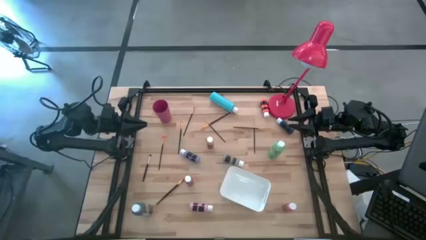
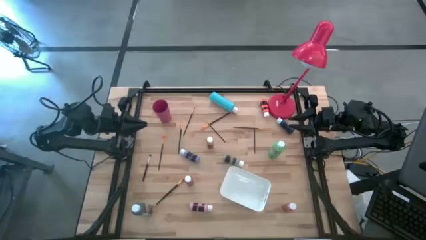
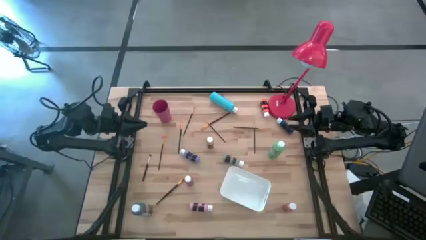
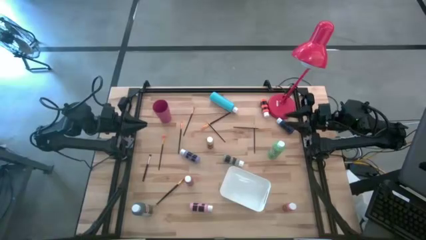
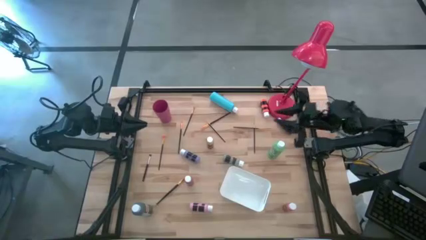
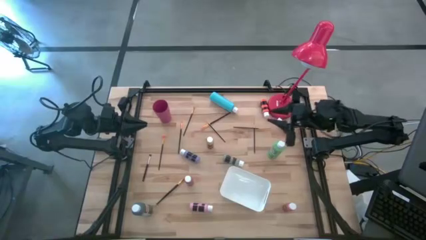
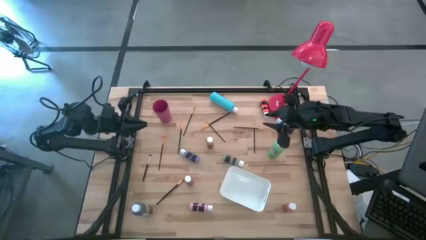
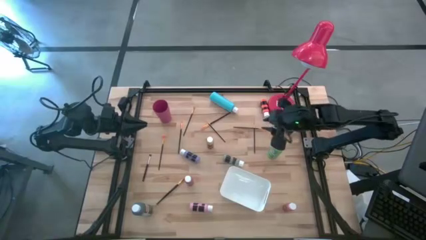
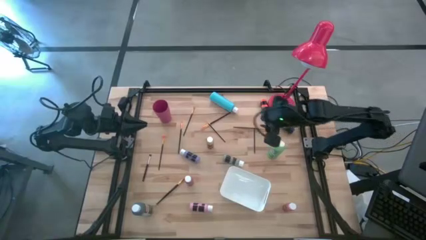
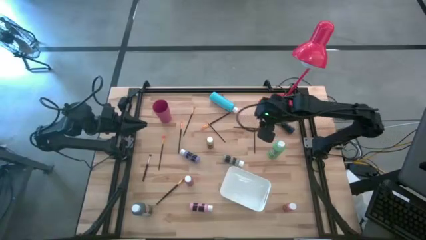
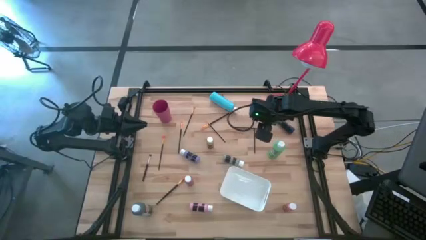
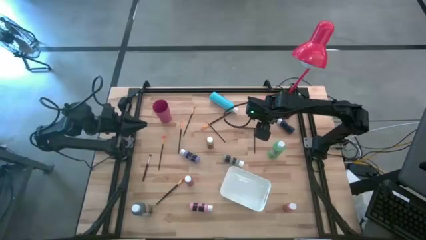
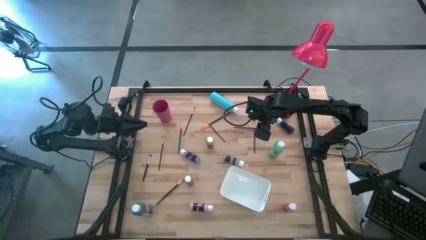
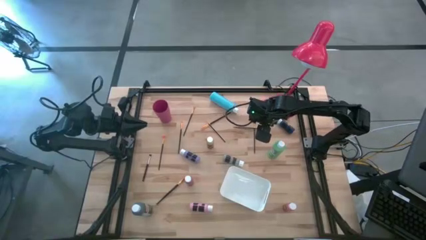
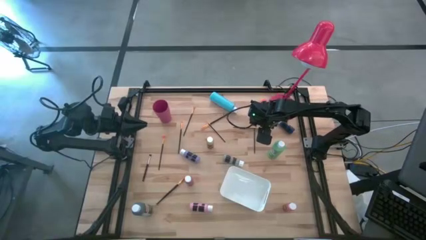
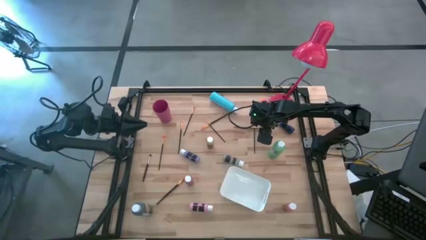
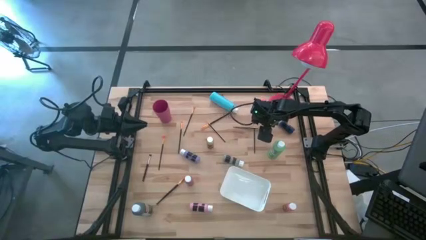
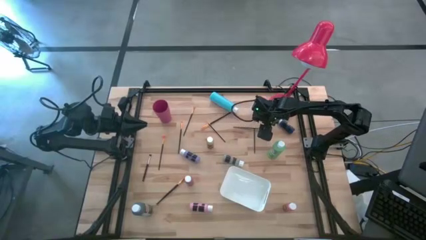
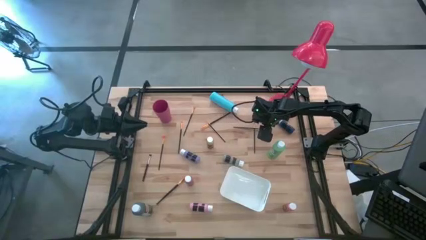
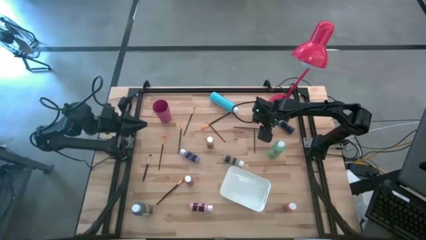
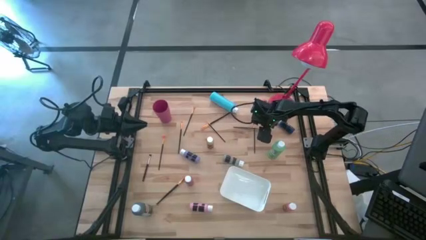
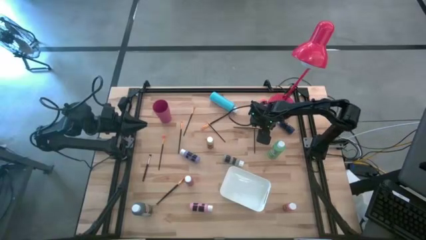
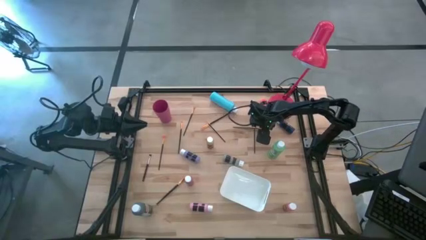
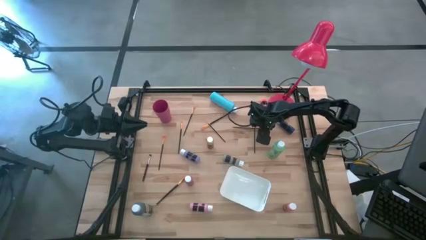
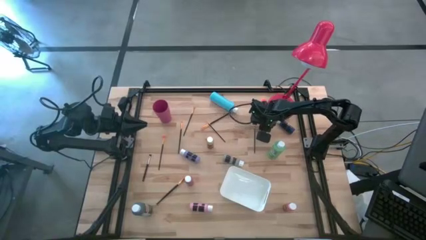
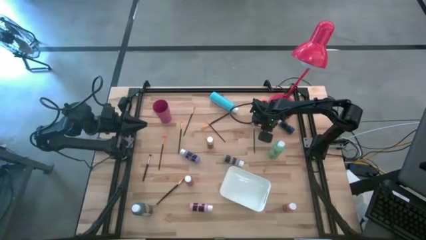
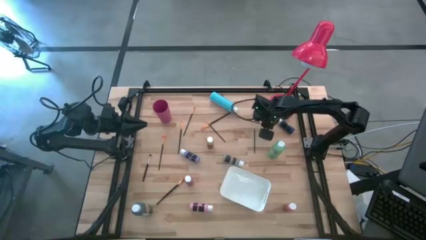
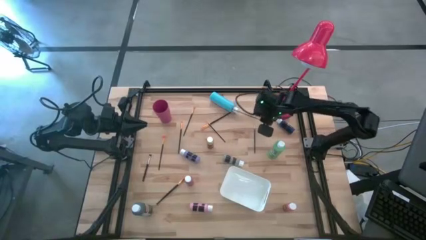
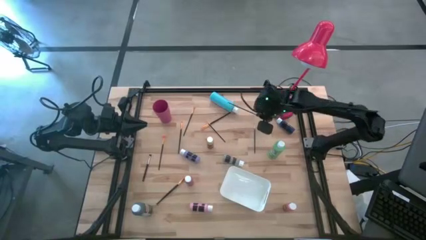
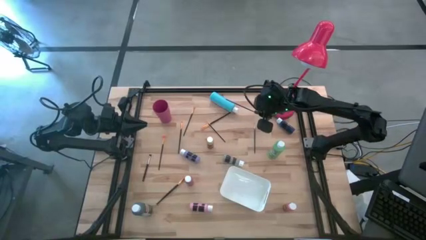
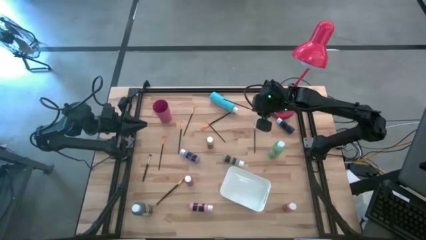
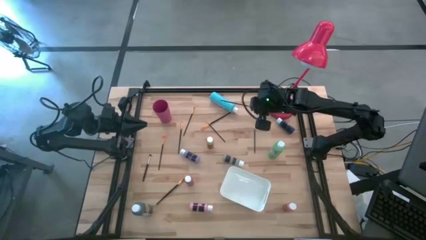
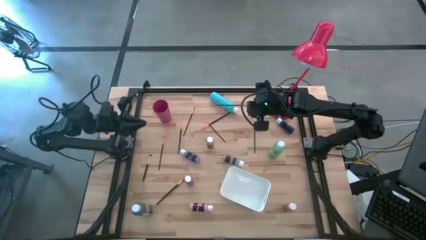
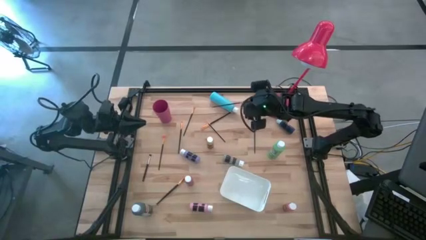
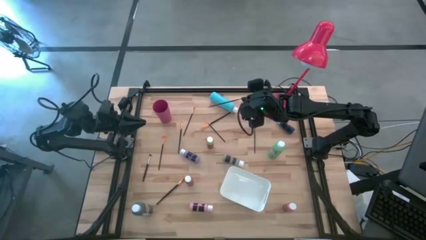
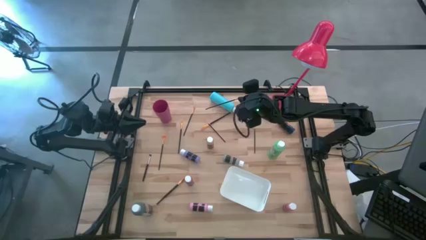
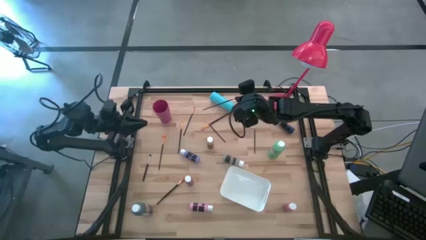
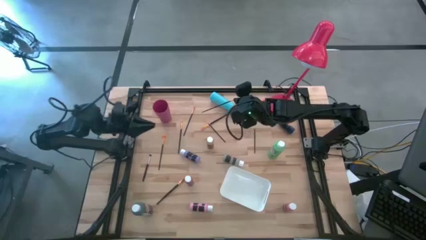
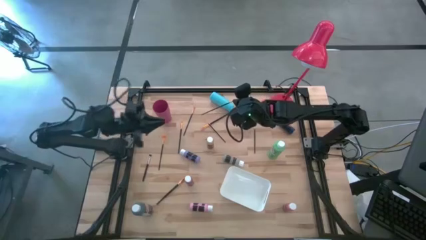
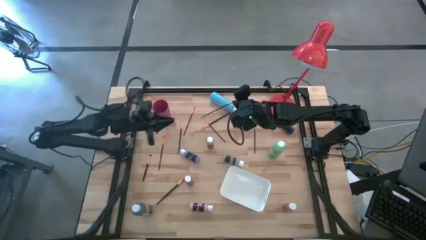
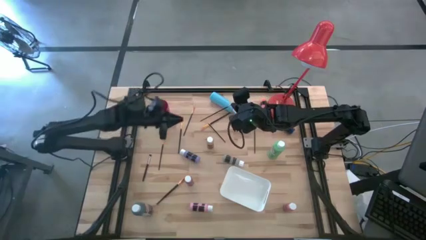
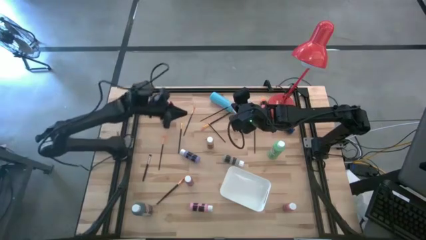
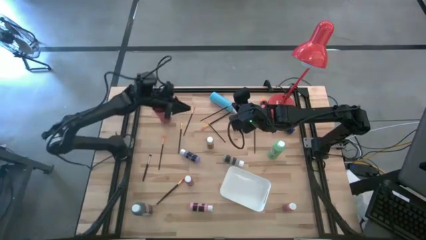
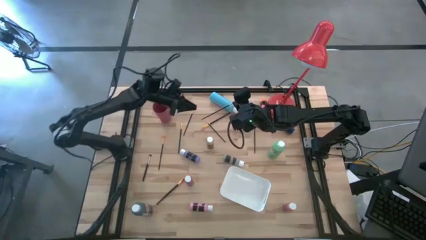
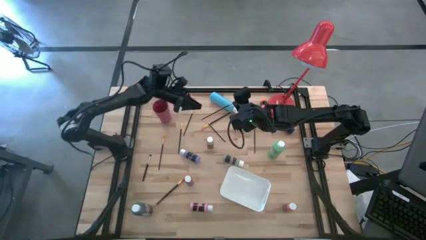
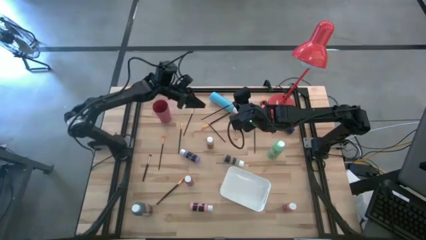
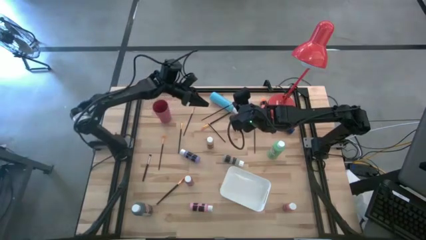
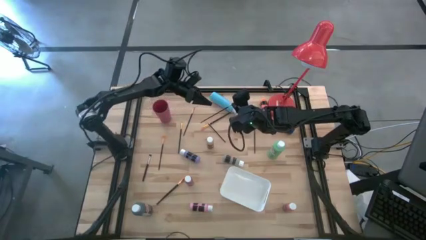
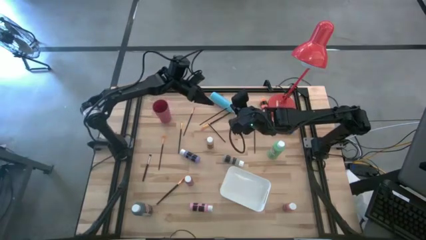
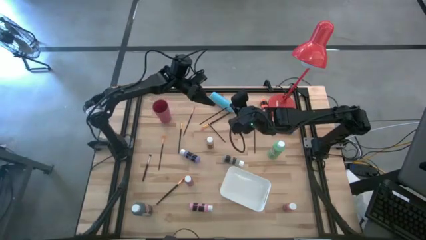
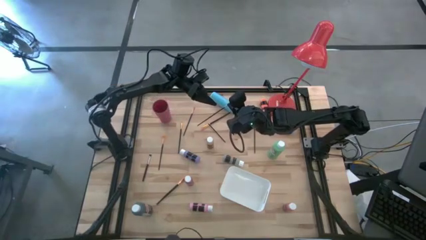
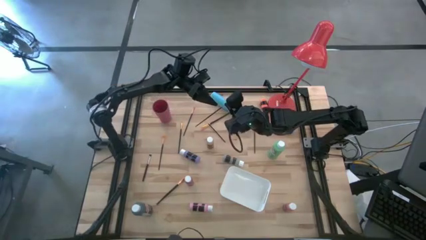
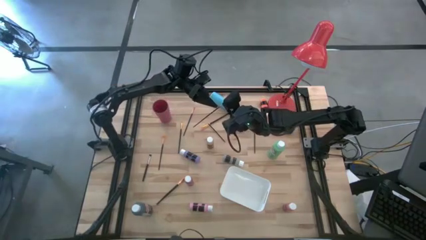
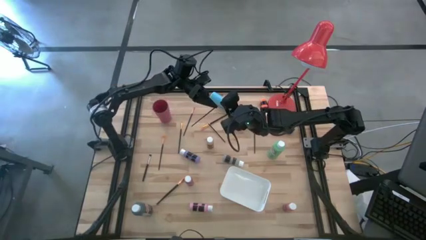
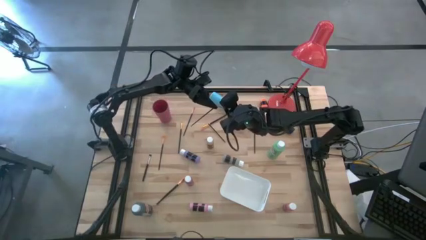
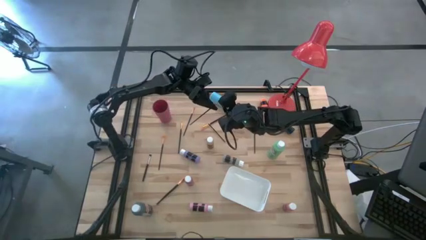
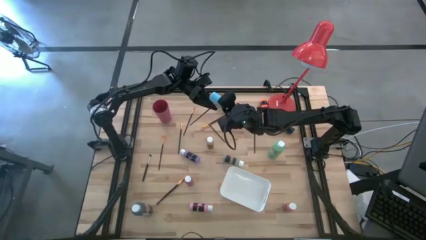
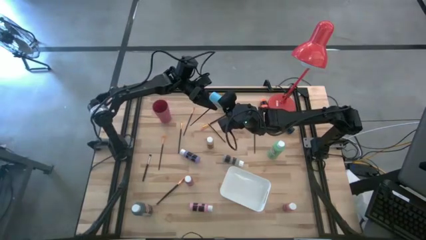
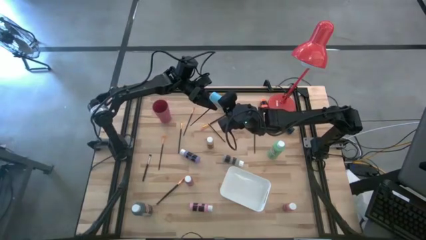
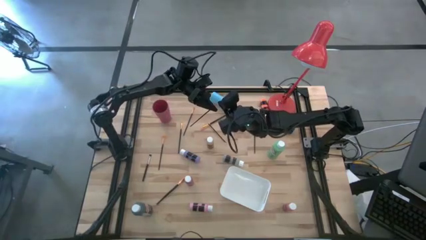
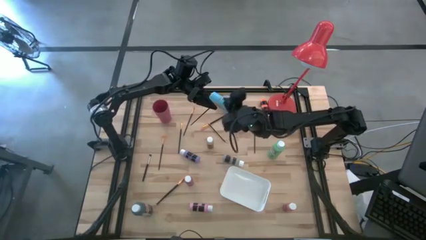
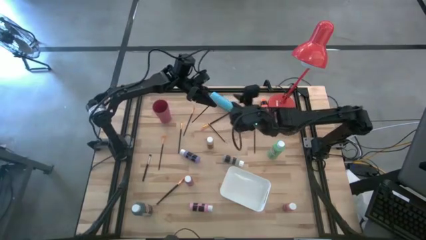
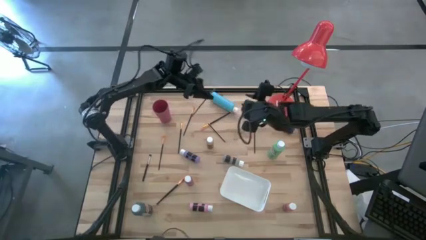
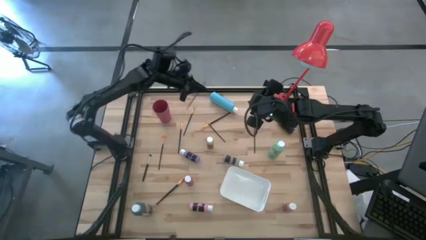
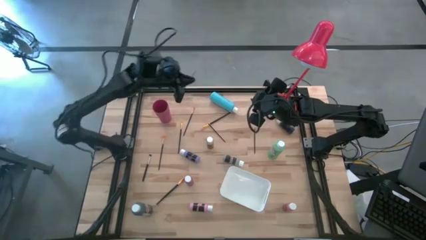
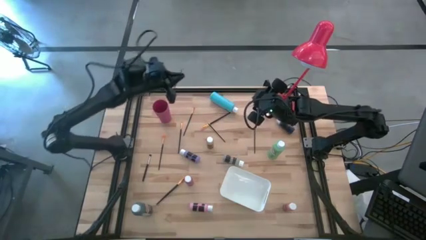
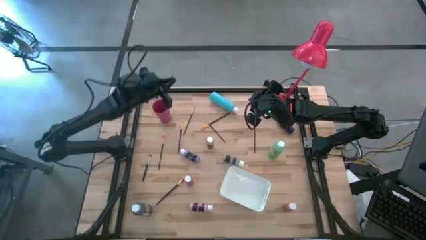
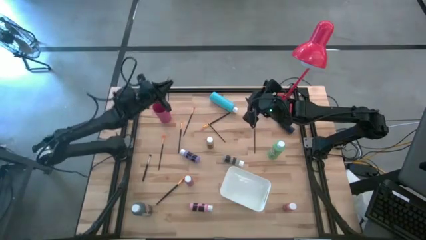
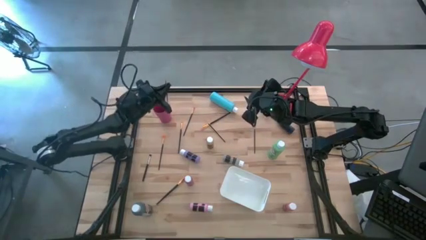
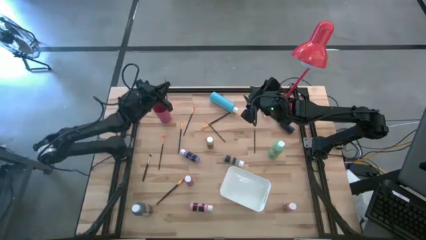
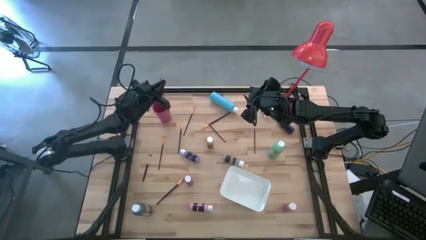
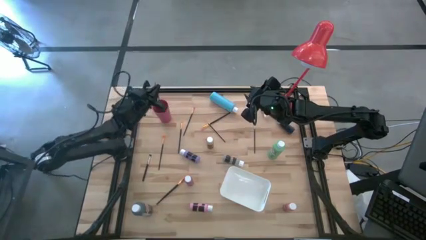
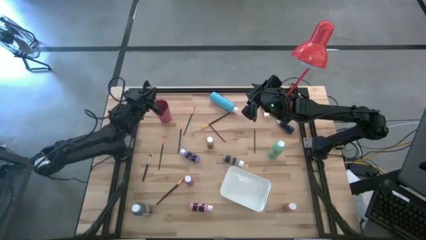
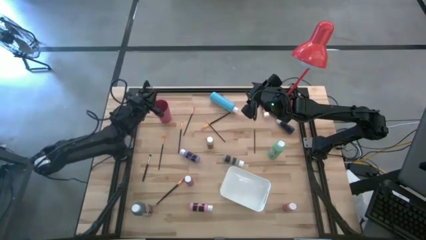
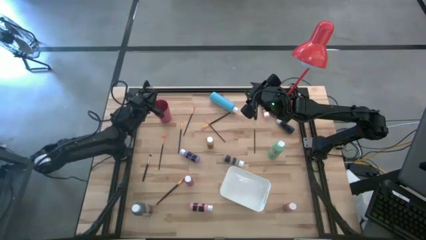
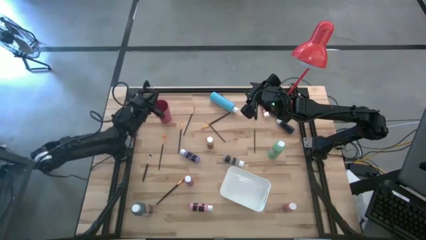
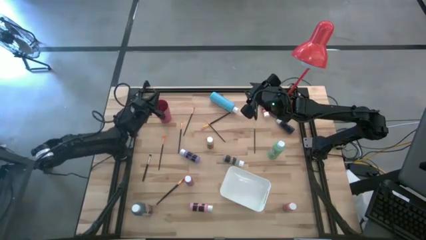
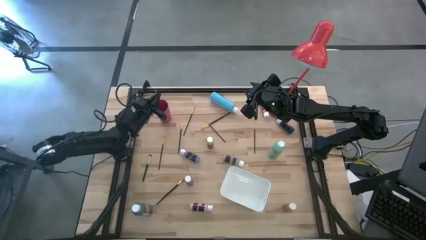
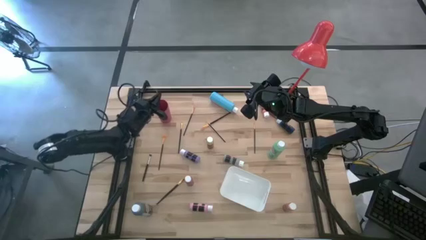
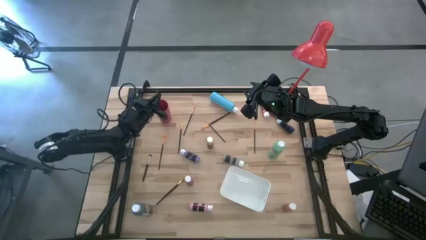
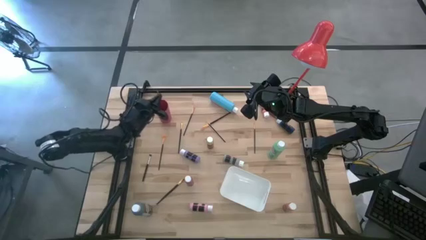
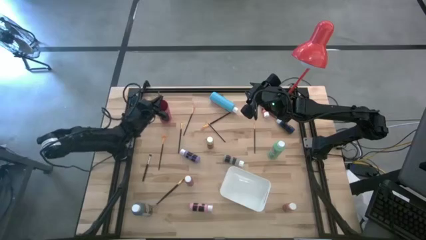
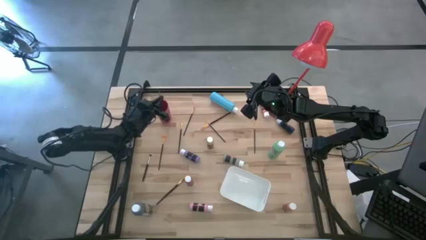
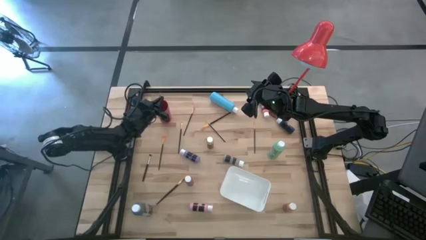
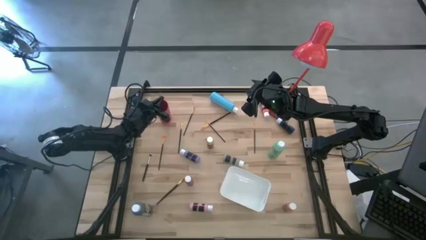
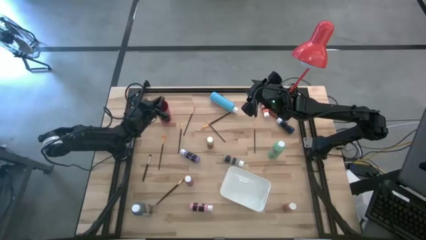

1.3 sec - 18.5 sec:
Task: Pick & Place Paint Supplies
Put the orange paintbrush into the pink cup
